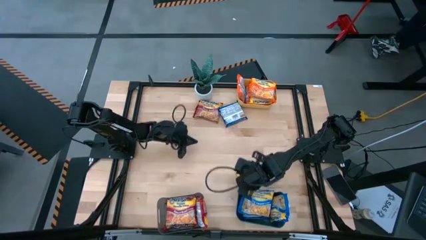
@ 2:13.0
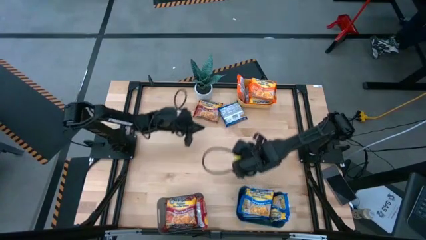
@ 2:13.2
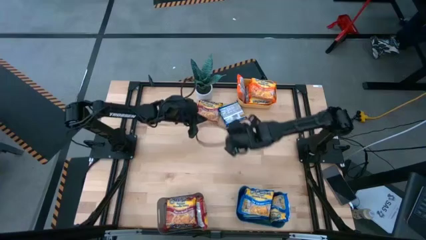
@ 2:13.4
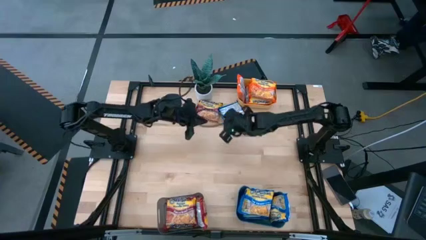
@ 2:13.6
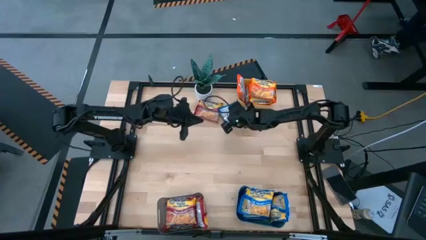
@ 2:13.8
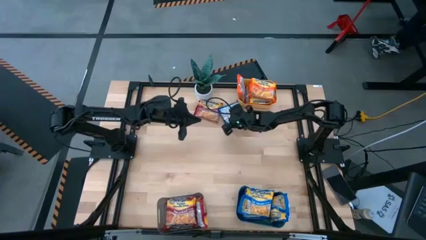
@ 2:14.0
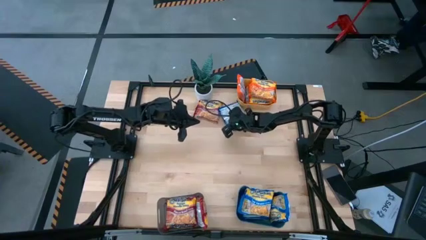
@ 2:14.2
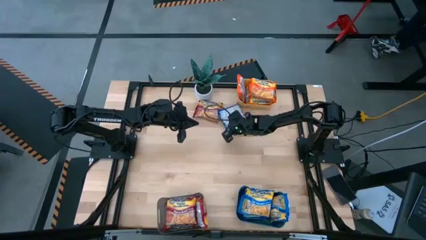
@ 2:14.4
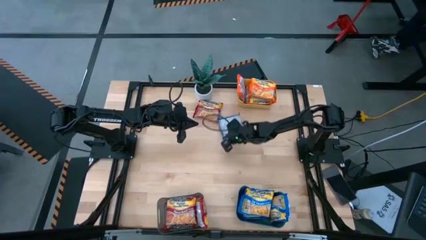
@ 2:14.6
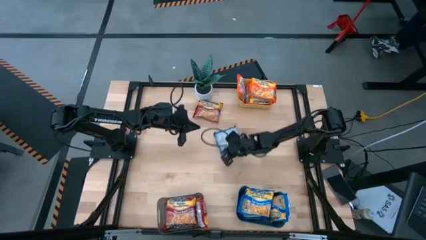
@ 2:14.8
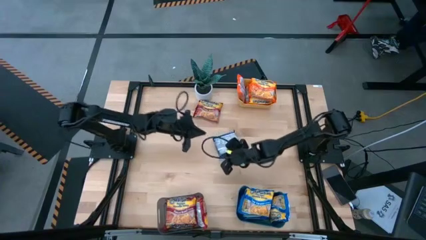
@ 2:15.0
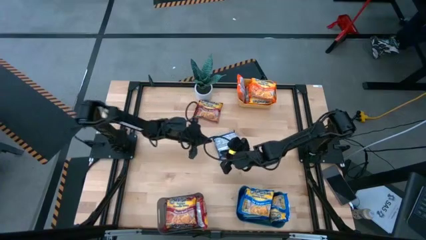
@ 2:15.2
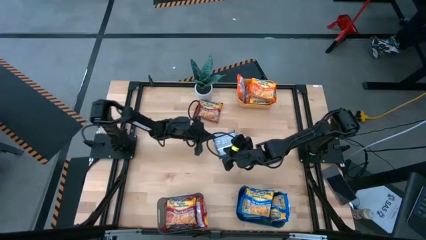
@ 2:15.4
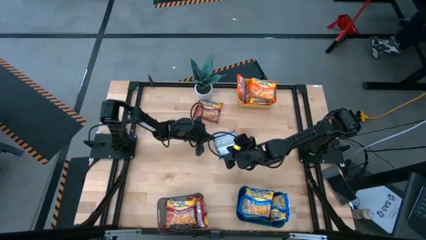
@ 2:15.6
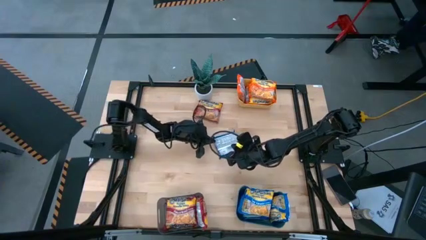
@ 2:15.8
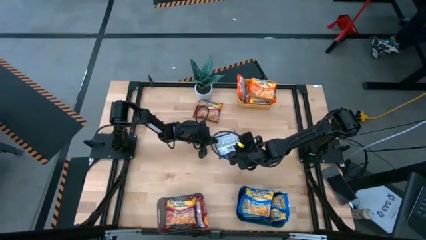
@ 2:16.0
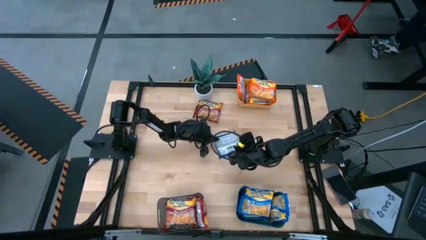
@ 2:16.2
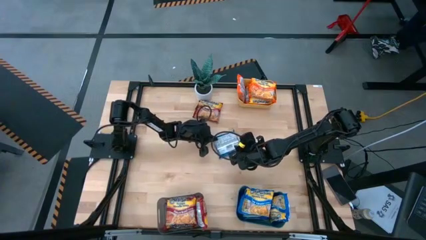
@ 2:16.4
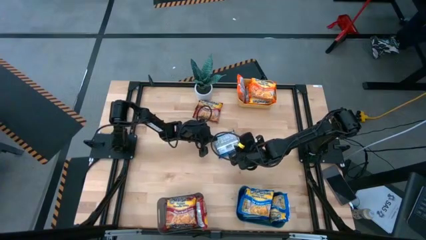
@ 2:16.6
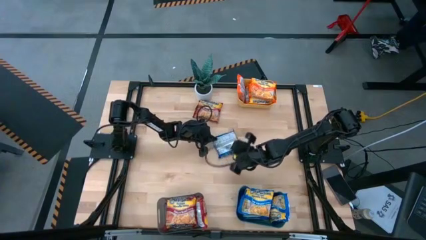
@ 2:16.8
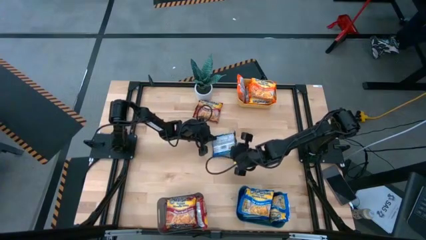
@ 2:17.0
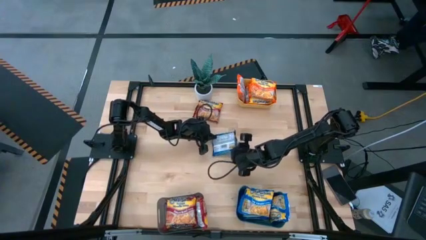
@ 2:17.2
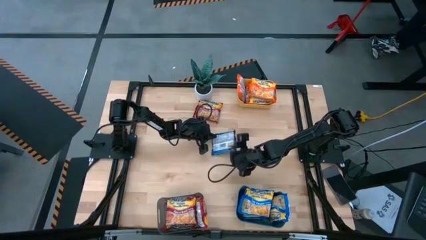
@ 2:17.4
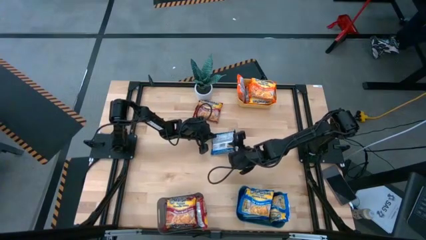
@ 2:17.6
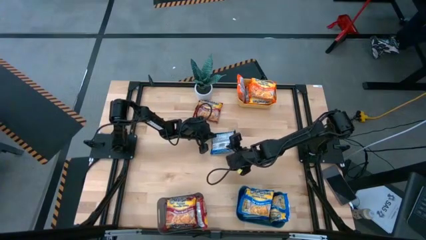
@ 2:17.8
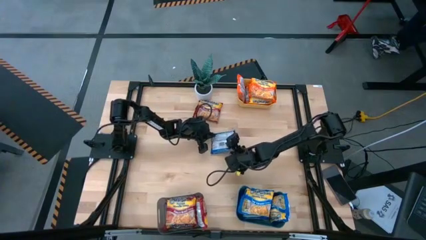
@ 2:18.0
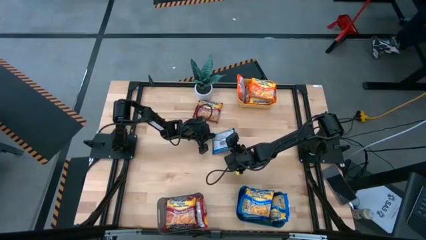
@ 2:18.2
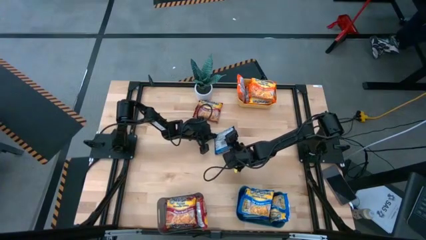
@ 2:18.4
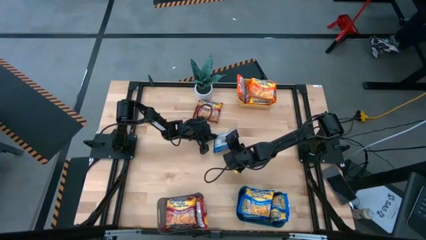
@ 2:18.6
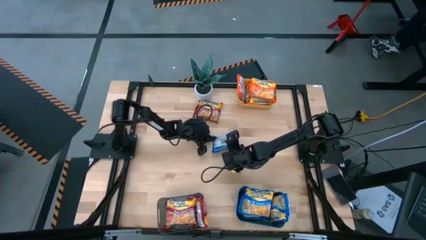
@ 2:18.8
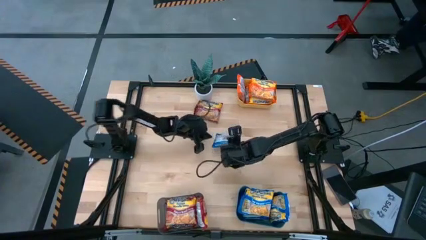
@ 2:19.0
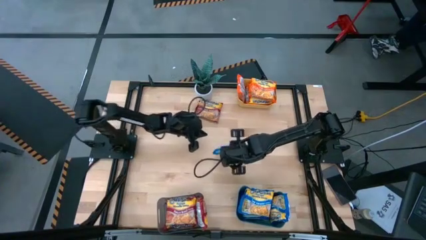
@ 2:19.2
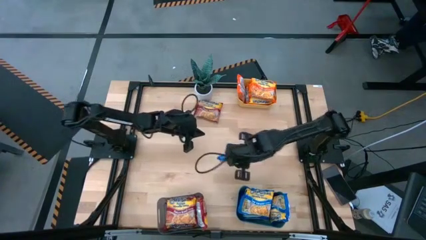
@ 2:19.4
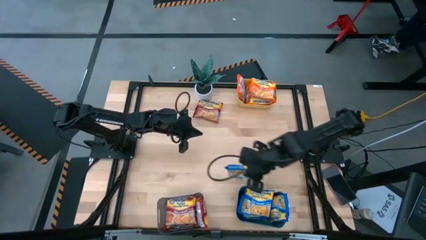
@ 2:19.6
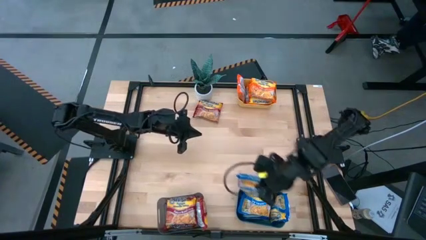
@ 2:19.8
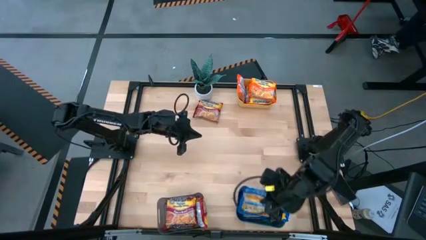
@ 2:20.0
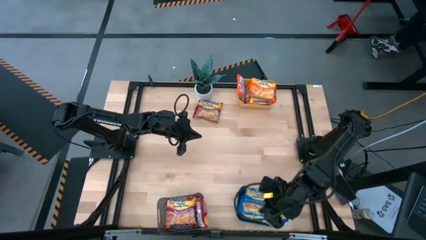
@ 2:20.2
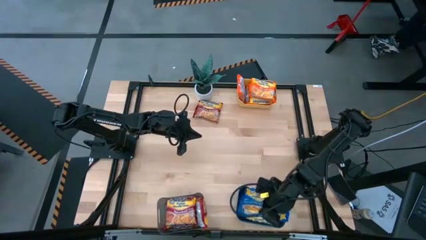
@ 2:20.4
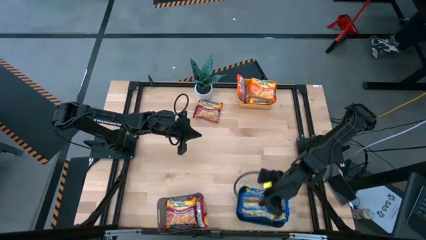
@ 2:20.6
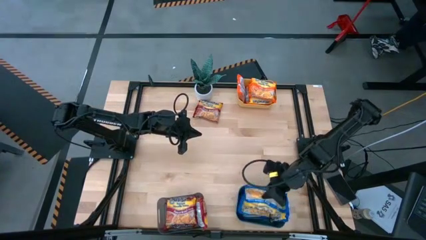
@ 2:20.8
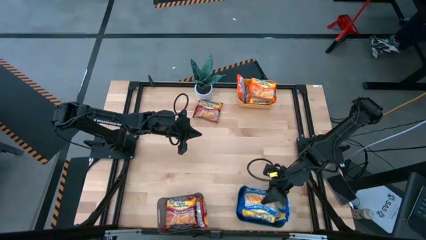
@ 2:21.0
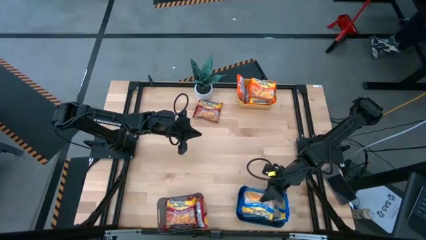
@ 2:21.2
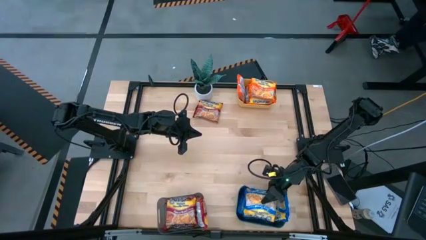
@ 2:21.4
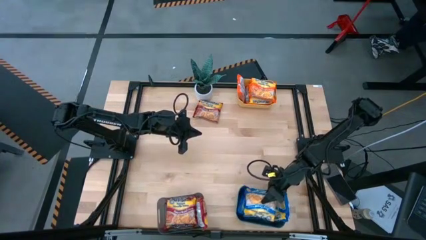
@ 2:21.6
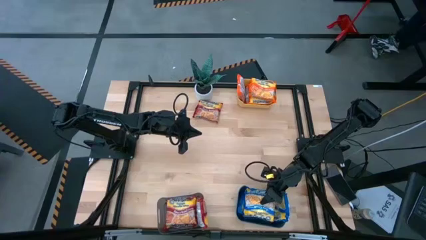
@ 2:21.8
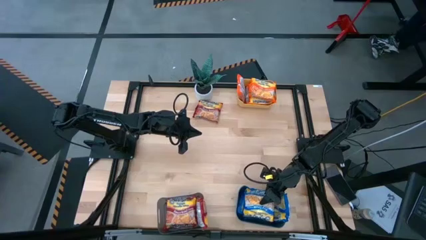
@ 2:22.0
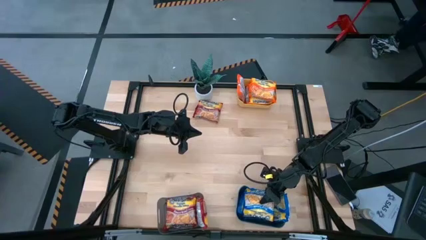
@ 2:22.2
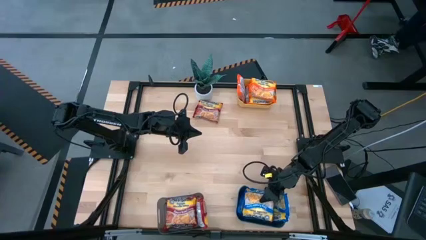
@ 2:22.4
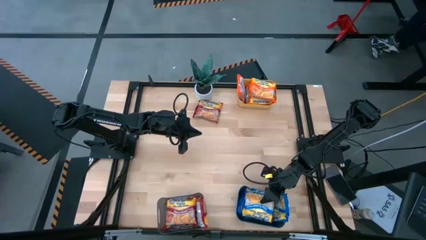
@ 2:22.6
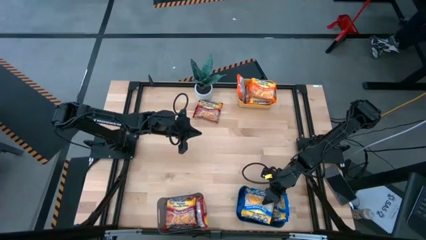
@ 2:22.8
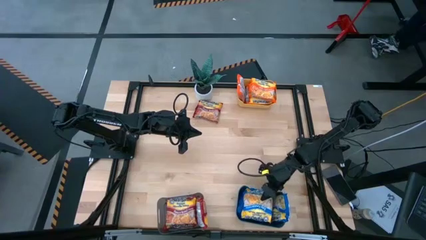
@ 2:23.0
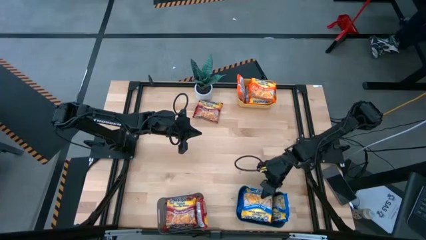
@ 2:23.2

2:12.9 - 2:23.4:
Task: Sort Maruchan noodles
Put the blue noodle pack into the blue bin
